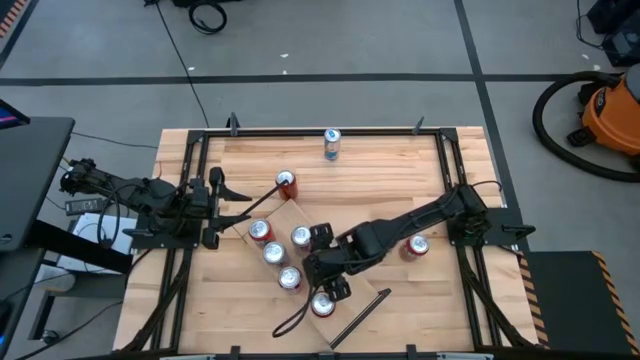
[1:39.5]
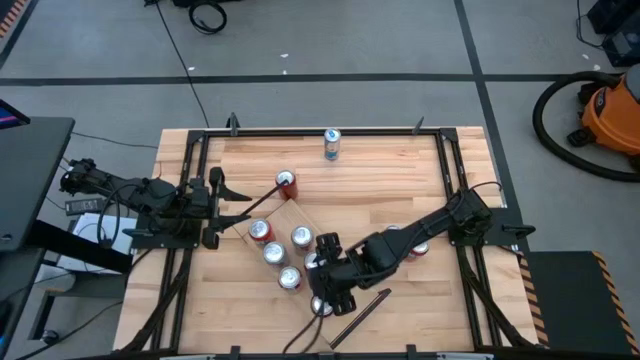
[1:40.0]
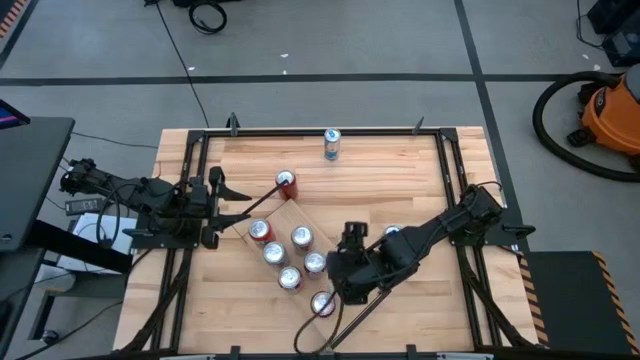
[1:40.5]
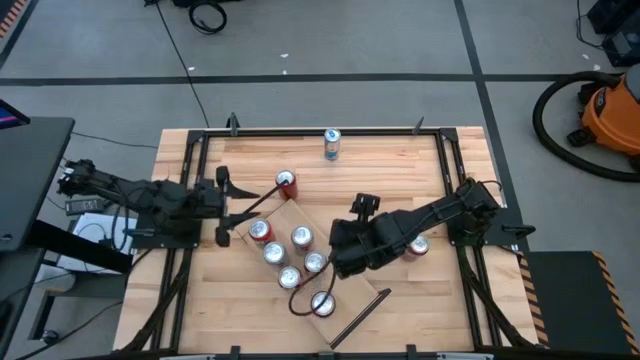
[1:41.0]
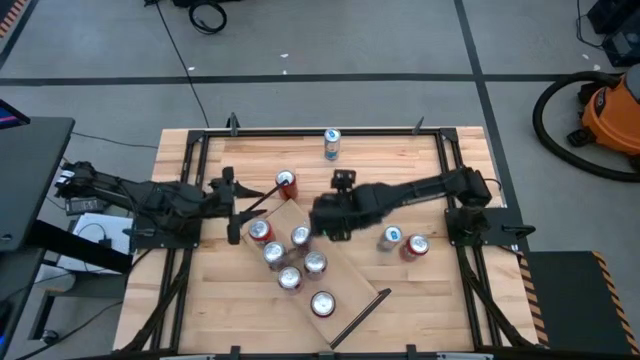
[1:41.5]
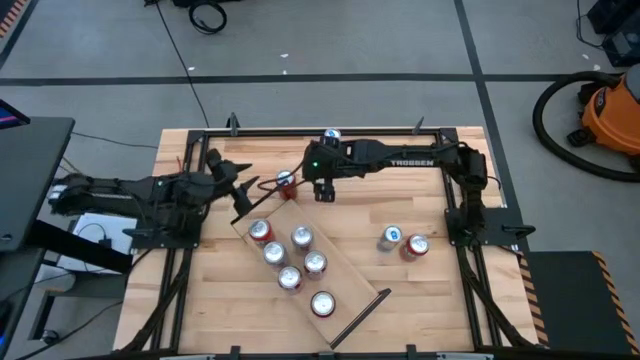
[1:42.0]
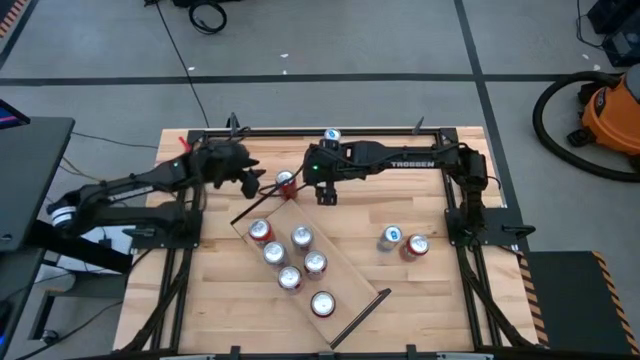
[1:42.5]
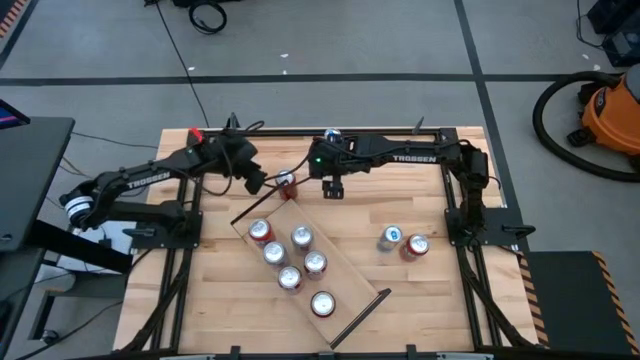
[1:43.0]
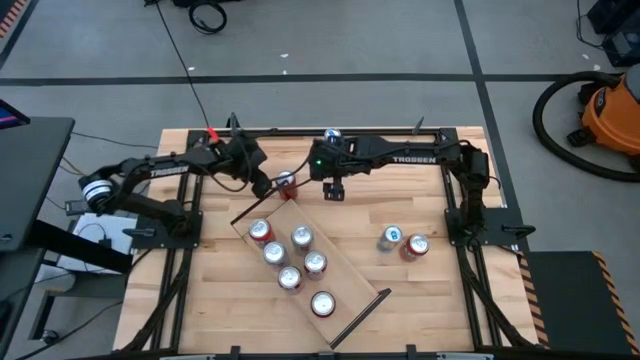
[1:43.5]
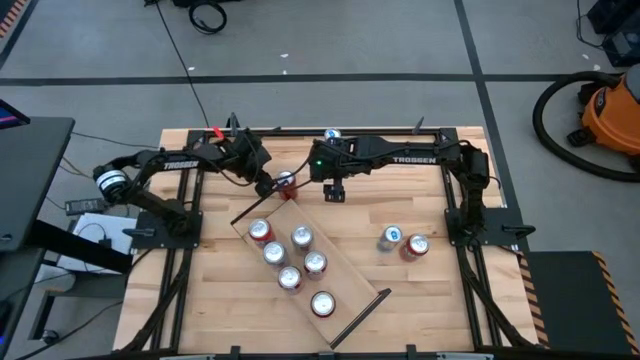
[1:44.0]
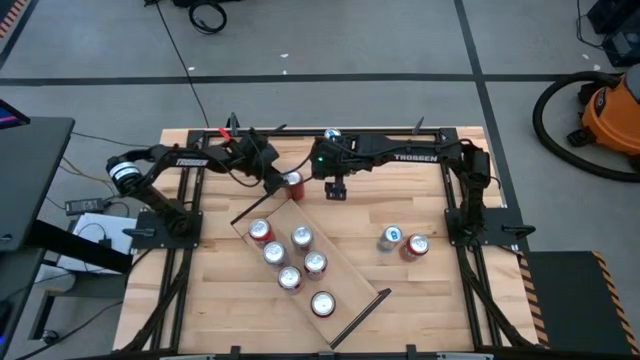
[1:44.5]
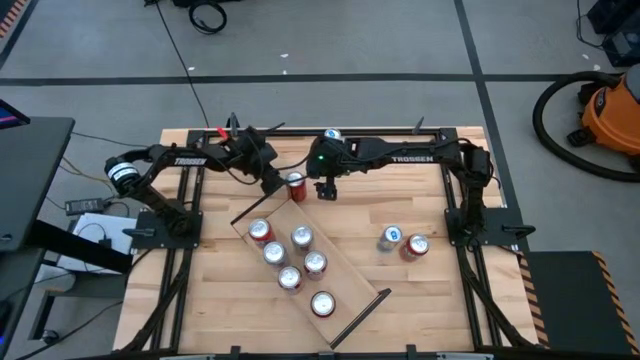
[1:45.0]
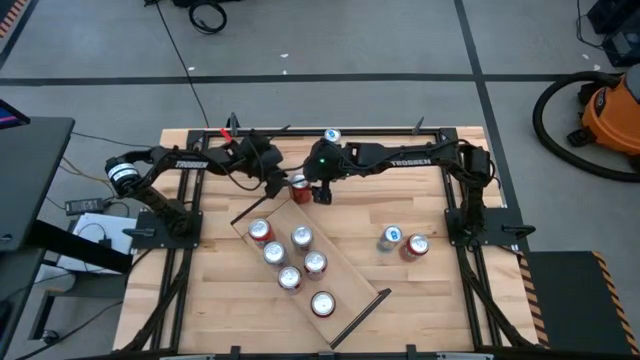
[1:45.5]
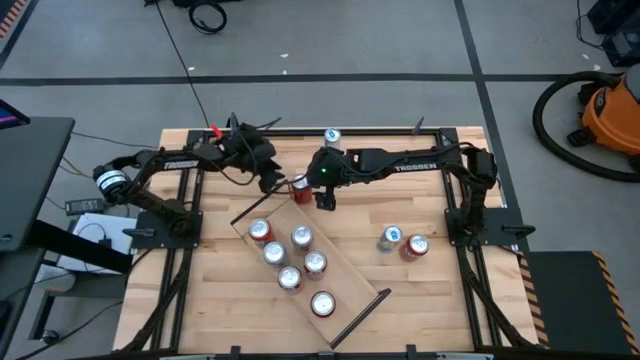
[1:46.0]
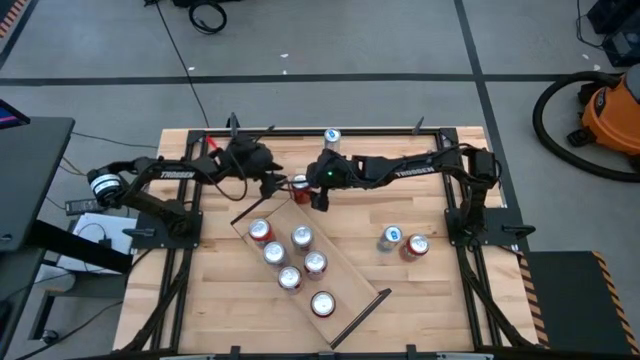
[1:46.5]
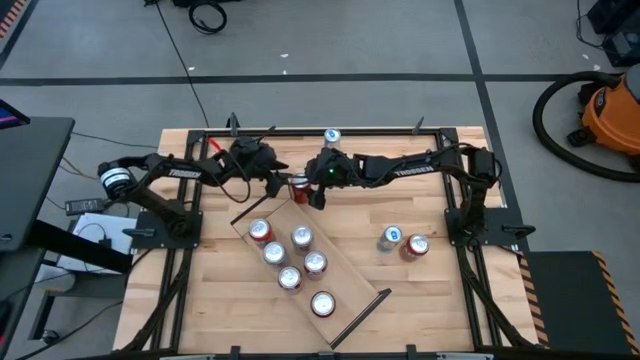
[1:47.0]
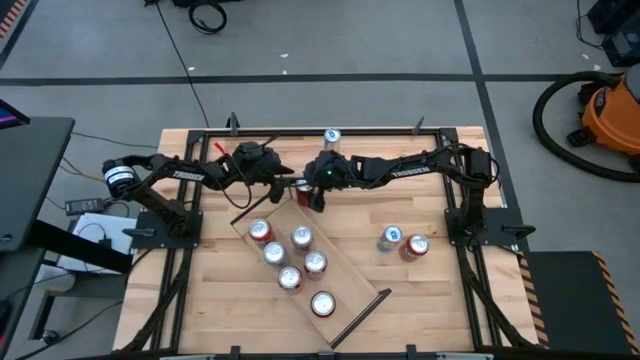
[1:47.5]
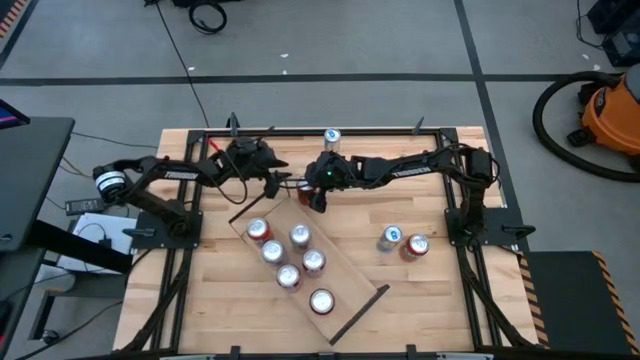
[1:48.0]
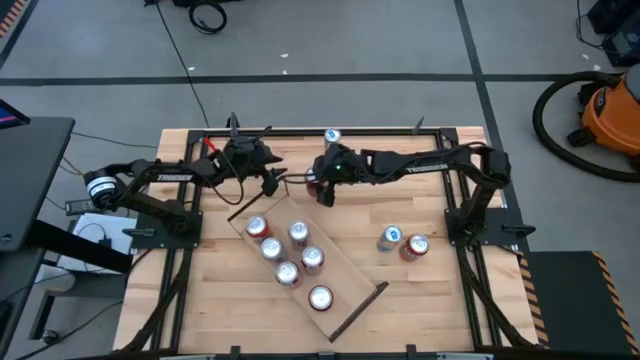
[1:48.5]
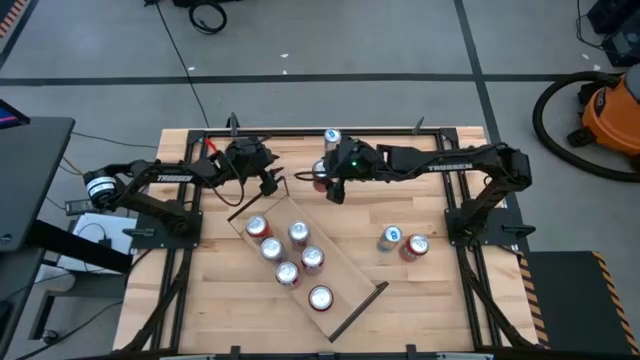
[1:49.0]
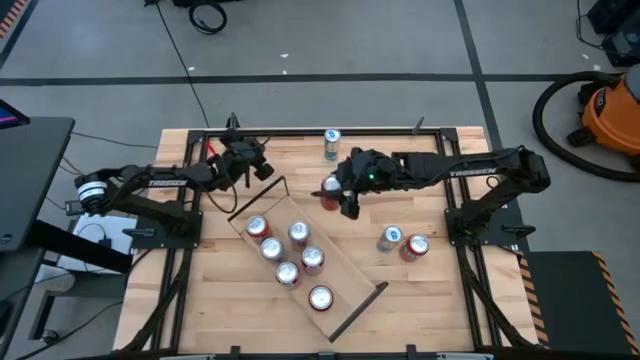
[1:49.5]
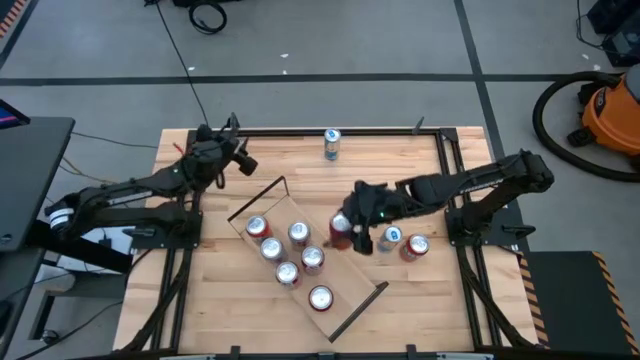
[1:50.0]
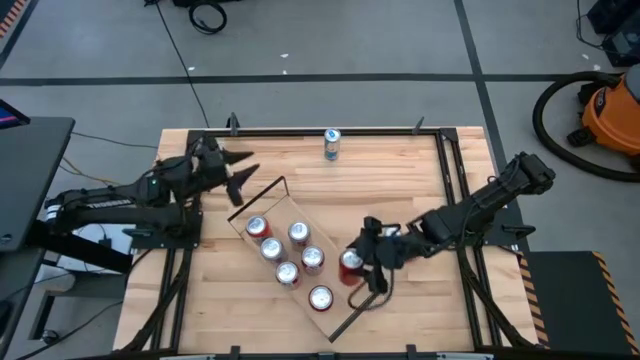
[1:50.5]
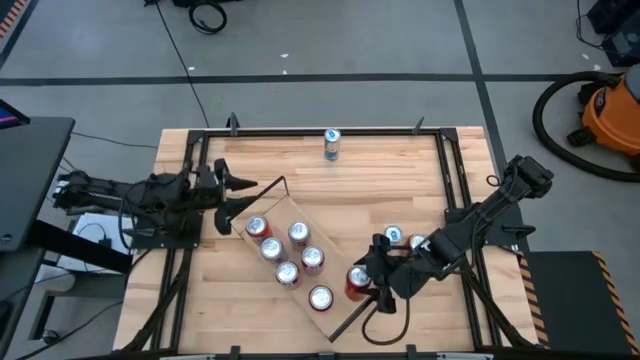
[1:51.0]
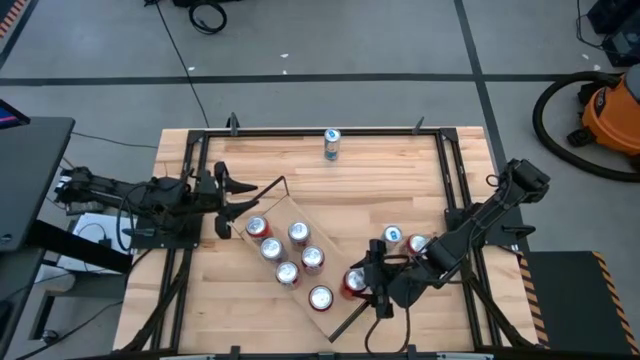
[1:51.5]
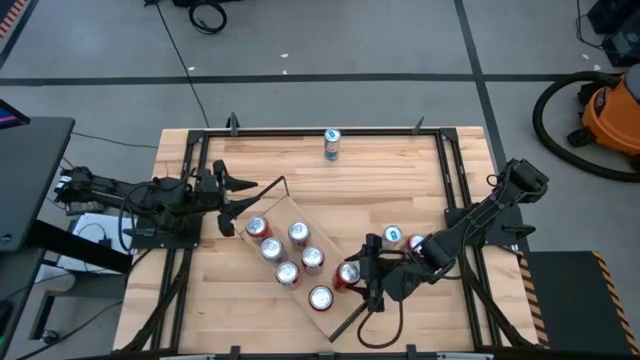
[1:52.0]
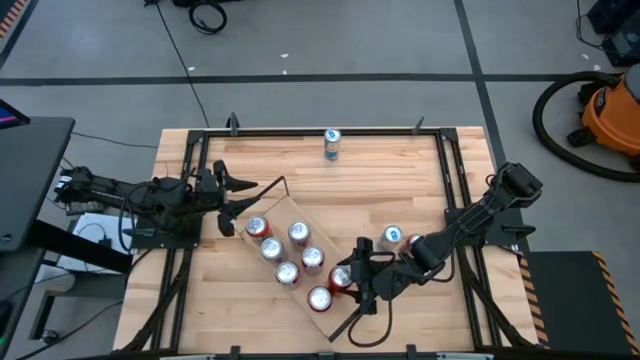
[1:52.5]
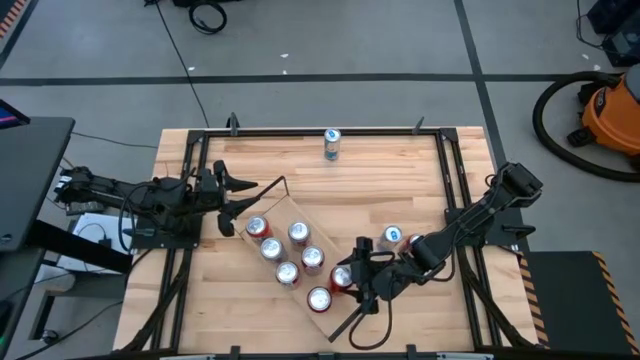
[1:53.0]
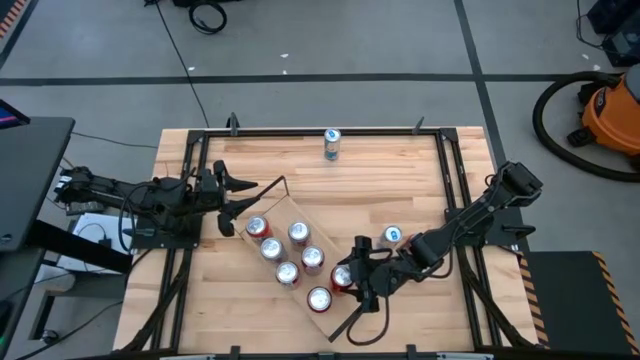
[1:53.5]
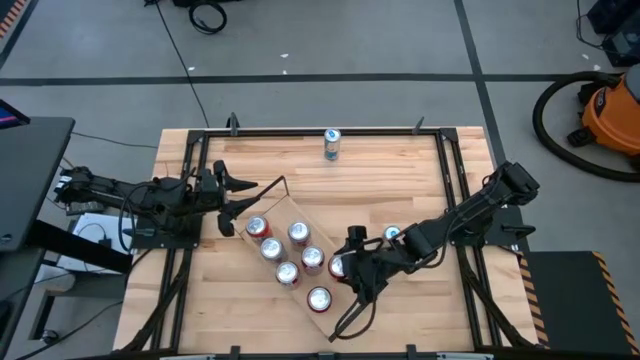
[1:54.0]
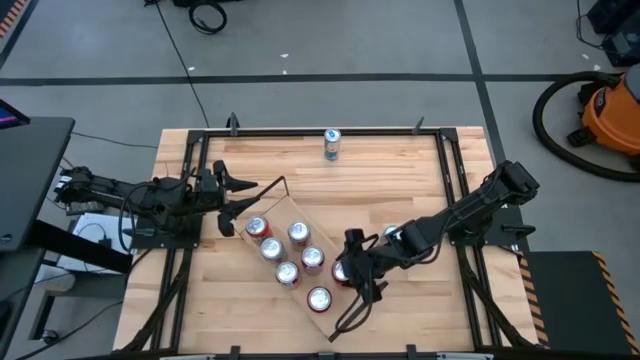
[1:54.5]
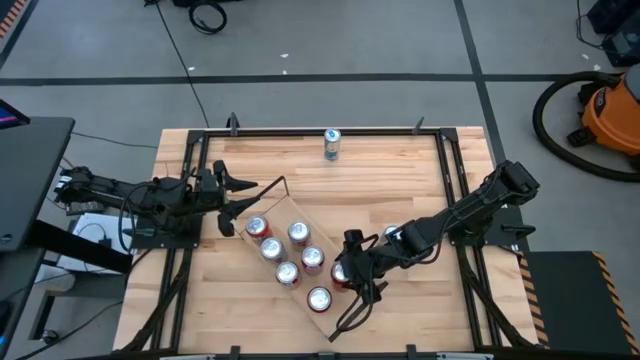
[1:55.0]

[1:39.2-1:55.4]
Task: Place canned beverage on shelf
Put the red and black soda can on the shelf aligned with the other red and black soda can

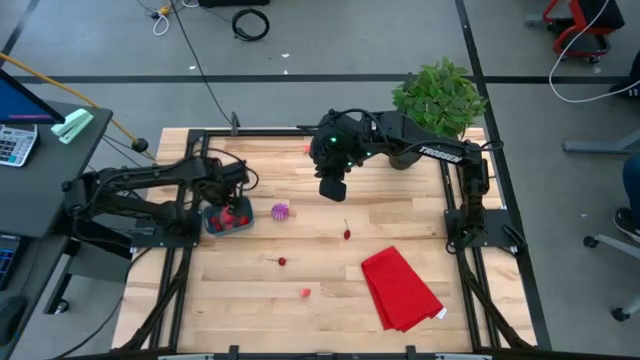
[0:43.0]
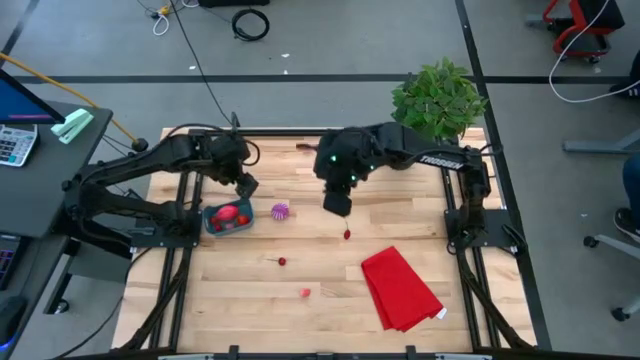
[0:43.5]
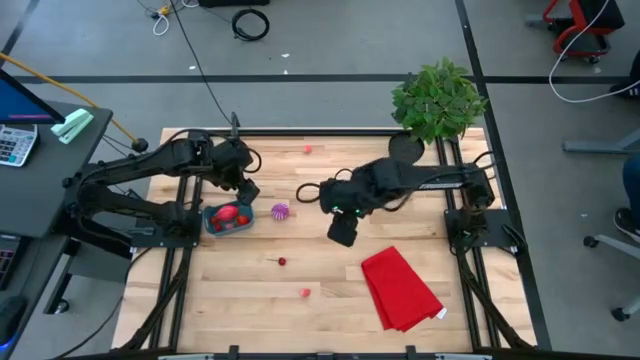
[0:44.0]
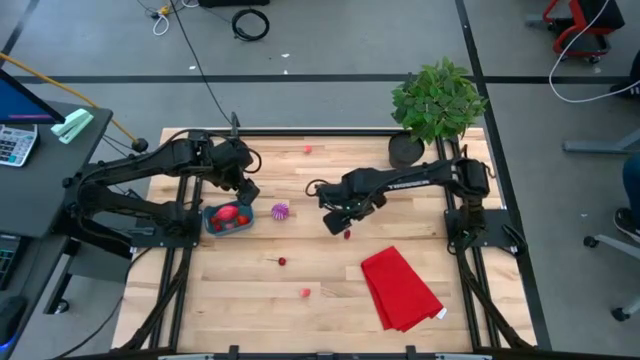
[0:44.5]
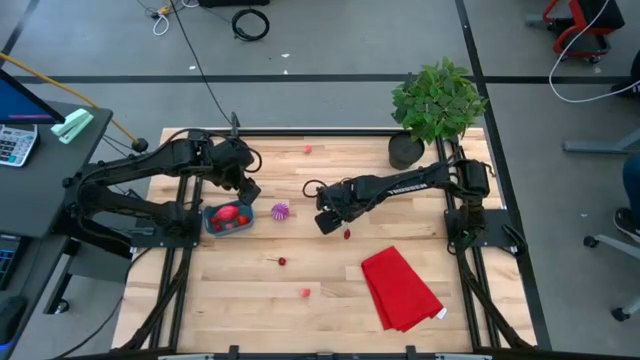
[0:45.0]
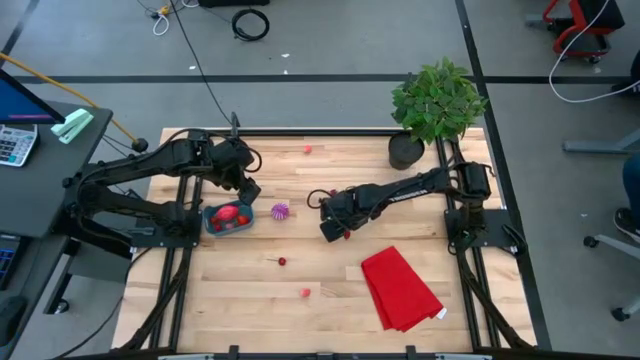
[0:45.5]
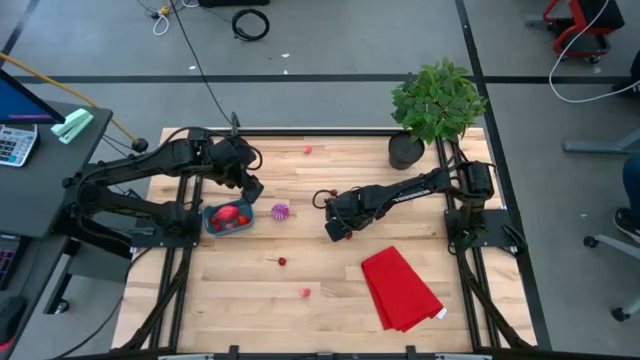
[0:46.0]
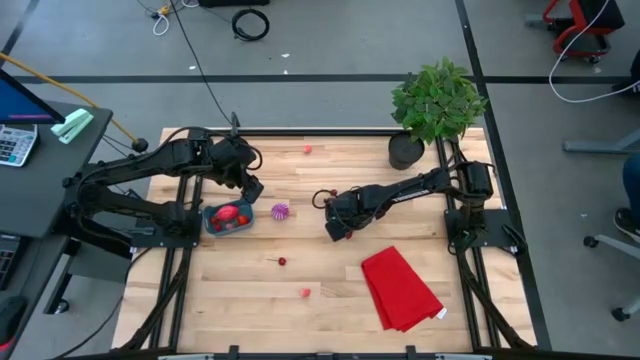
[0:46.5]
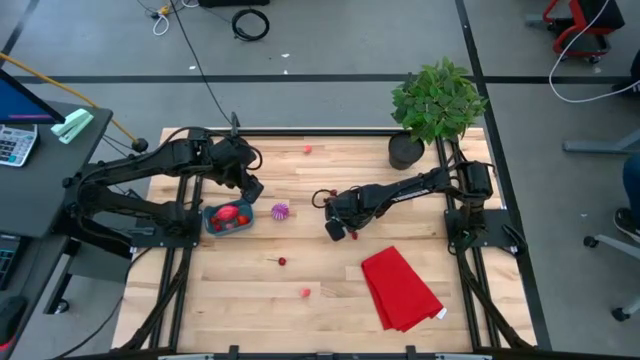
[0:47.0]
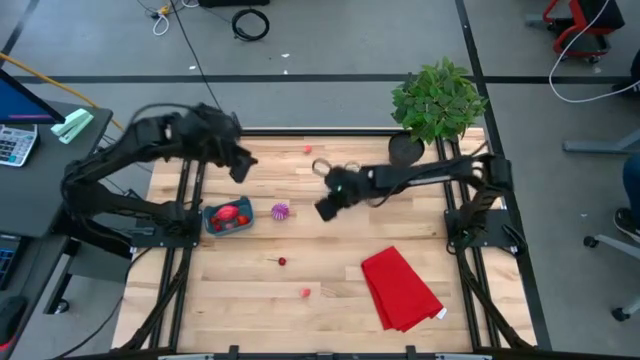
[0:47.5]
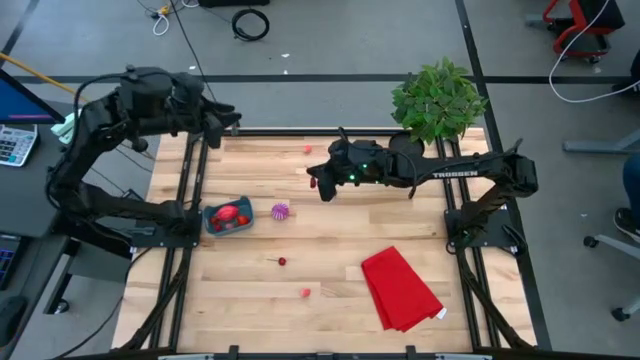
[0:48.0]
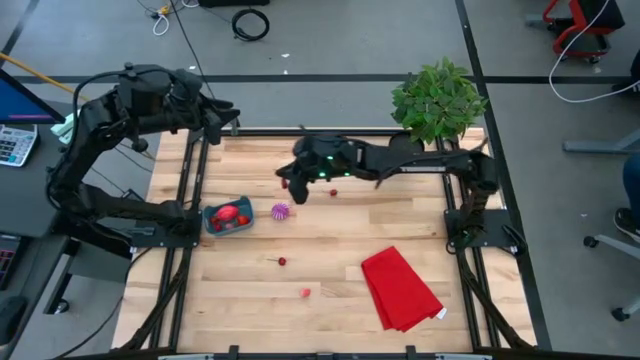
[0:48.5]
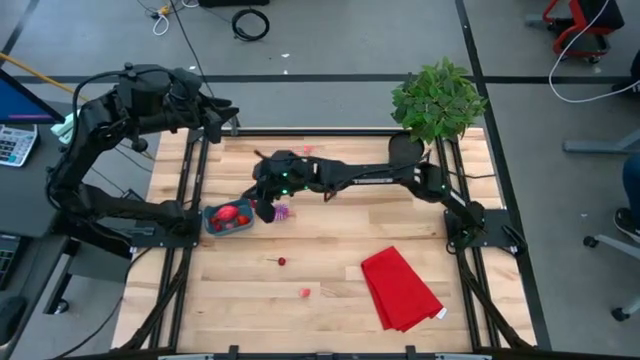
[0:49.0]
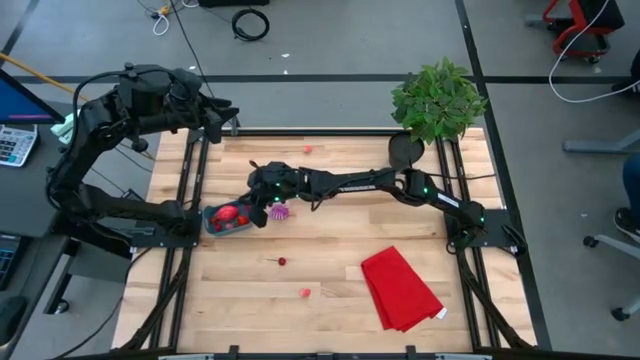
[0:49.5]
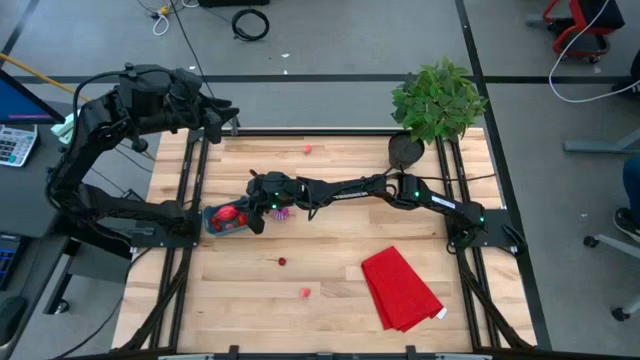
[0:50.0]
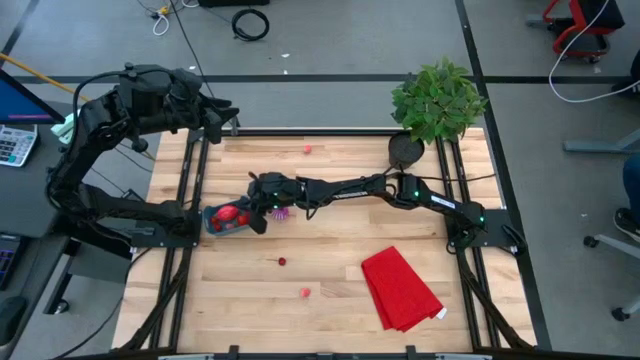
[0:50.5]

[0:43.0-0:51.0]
Task: Pick and placing Produce into tupperware
Put the right red cherry into the blue bin
